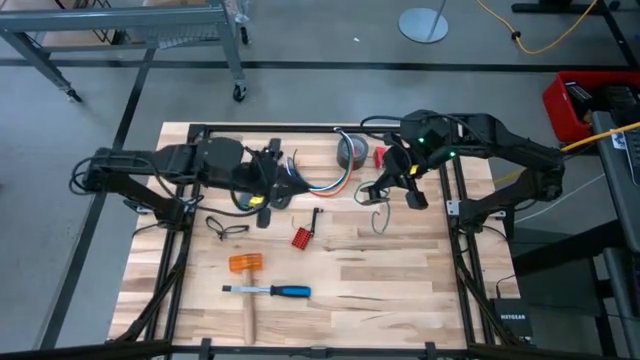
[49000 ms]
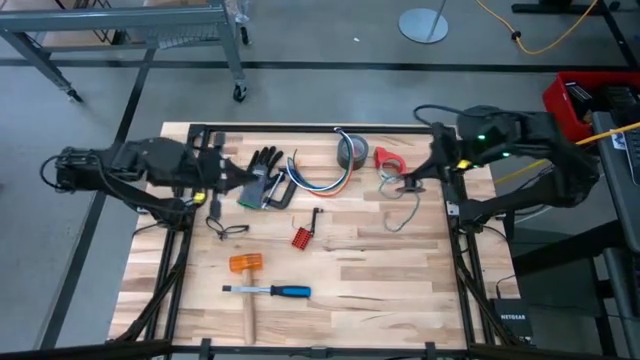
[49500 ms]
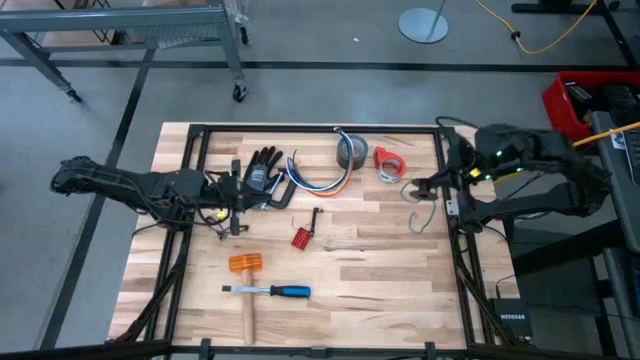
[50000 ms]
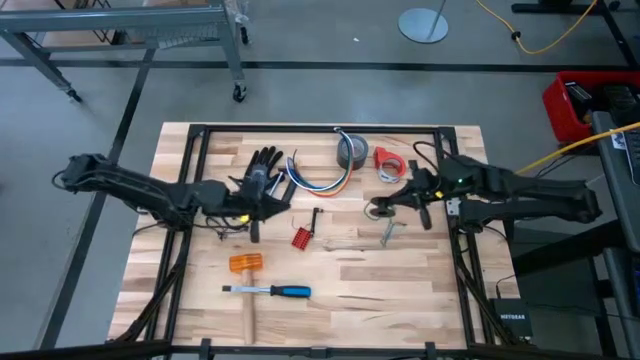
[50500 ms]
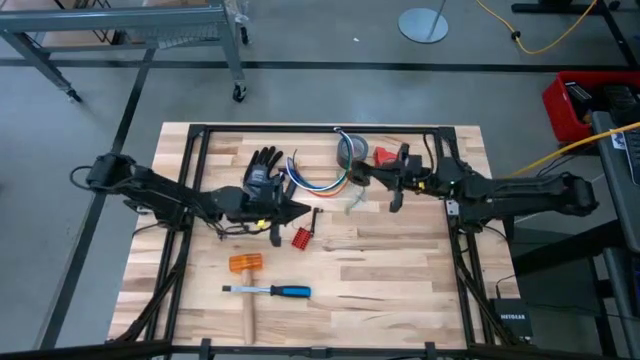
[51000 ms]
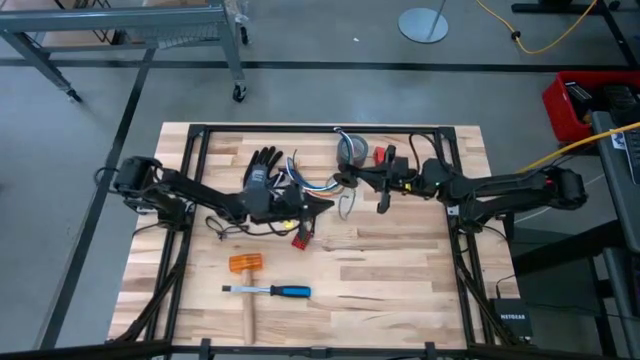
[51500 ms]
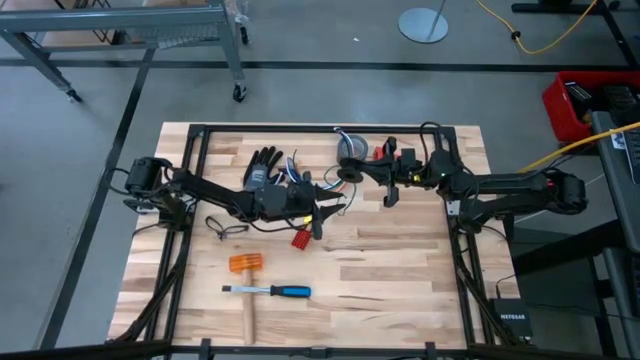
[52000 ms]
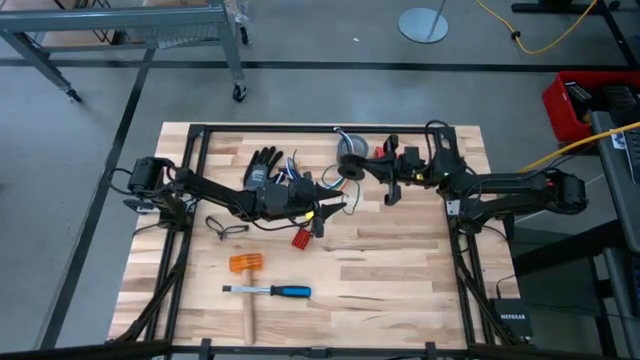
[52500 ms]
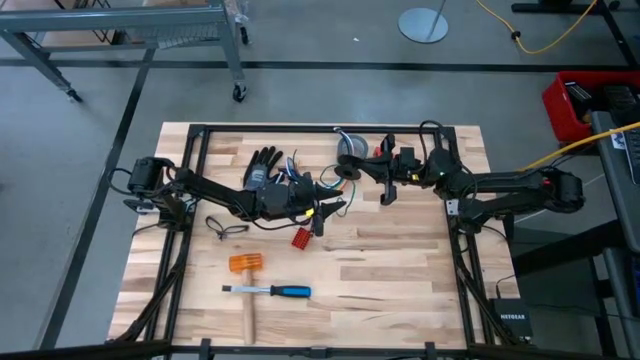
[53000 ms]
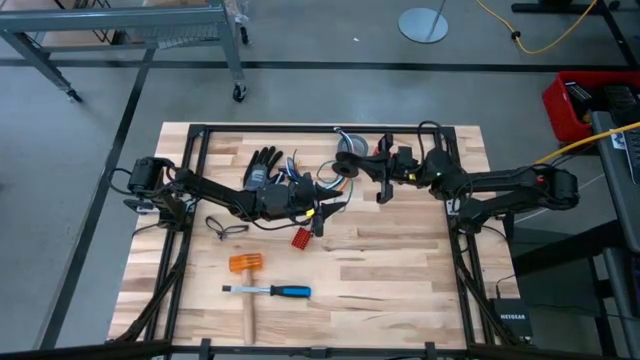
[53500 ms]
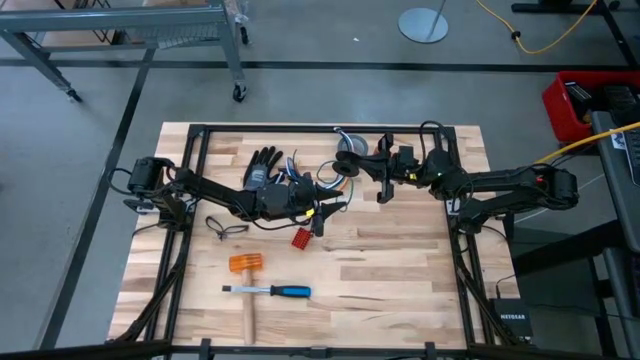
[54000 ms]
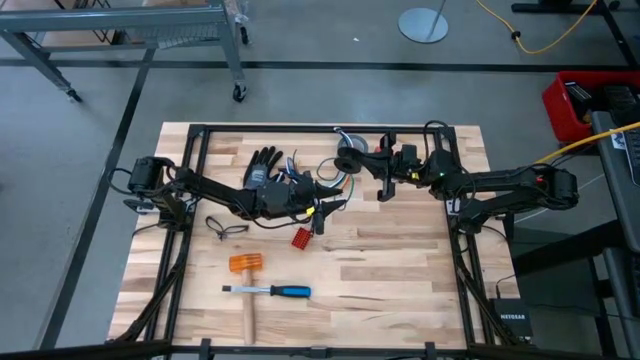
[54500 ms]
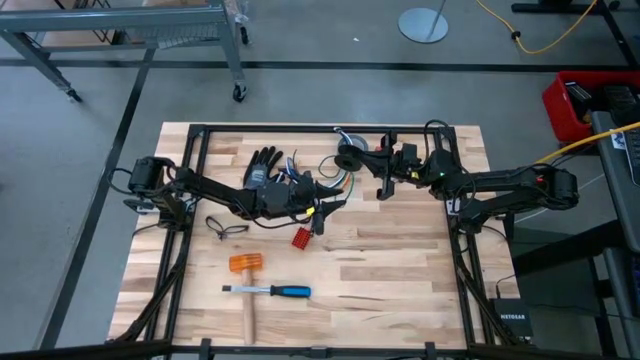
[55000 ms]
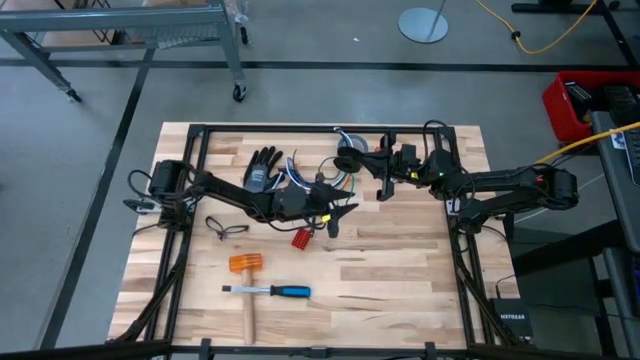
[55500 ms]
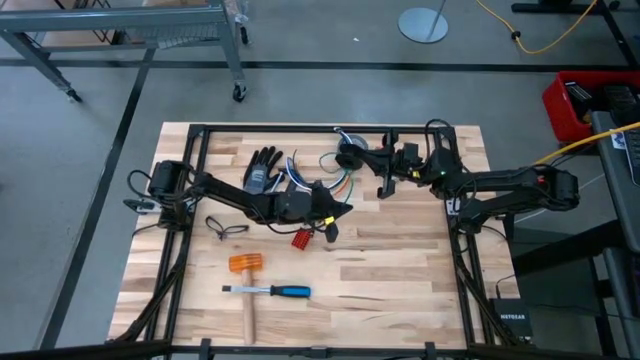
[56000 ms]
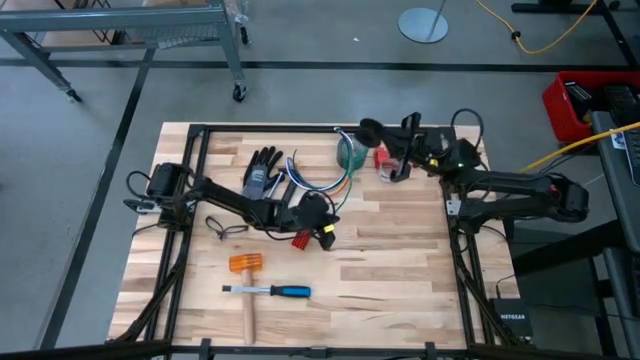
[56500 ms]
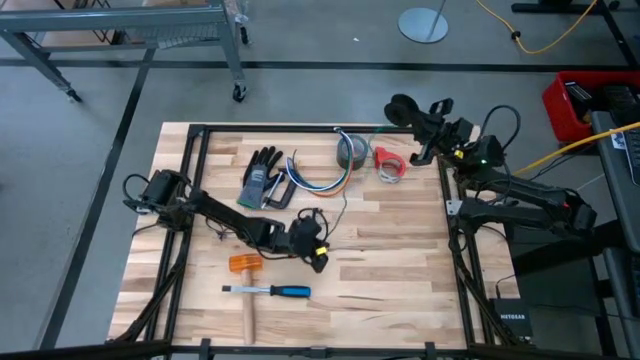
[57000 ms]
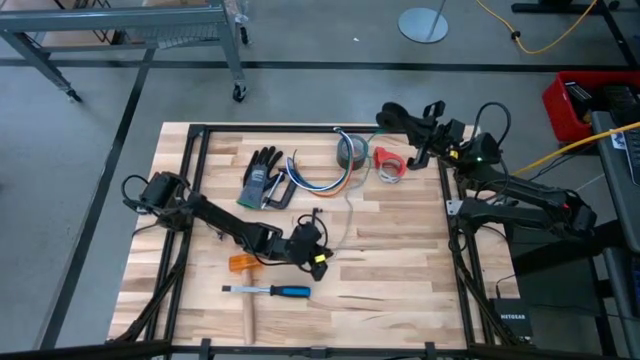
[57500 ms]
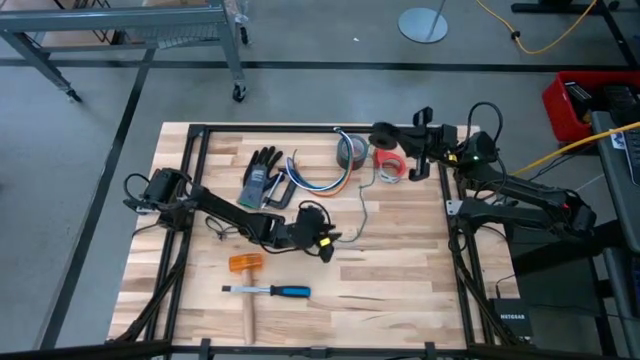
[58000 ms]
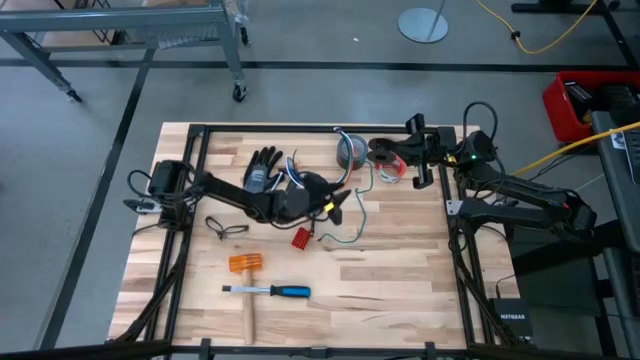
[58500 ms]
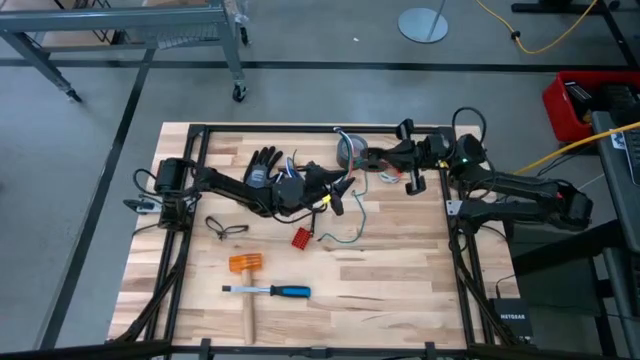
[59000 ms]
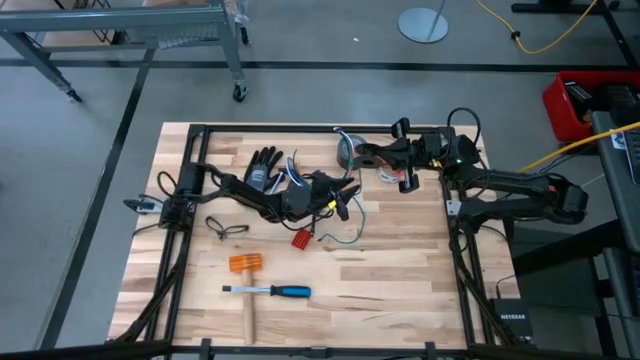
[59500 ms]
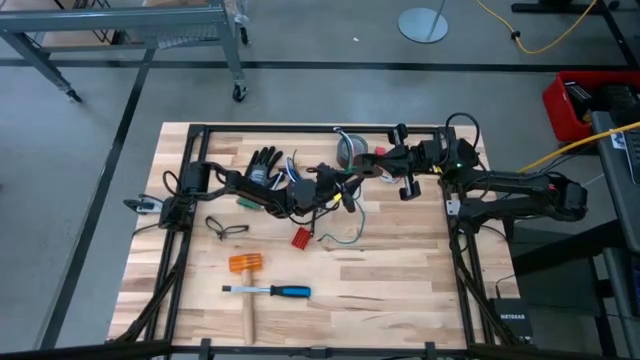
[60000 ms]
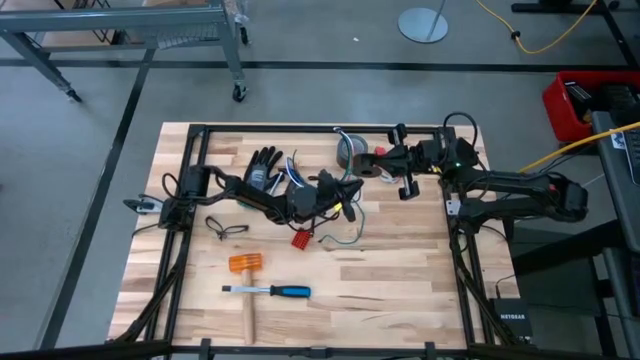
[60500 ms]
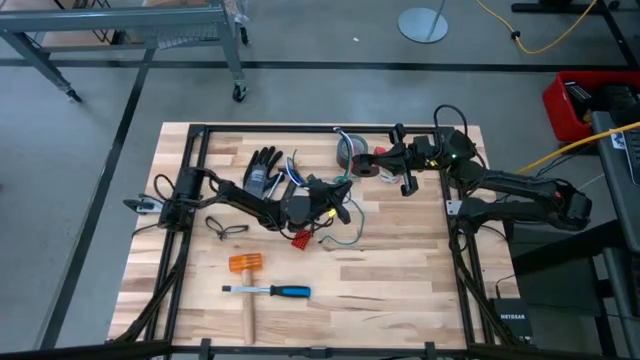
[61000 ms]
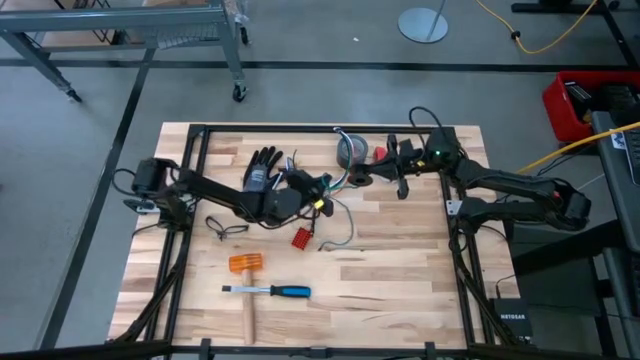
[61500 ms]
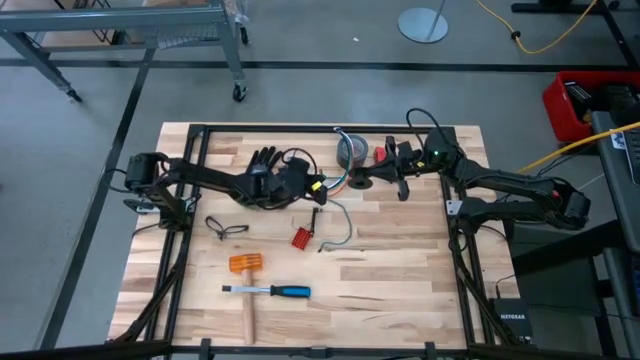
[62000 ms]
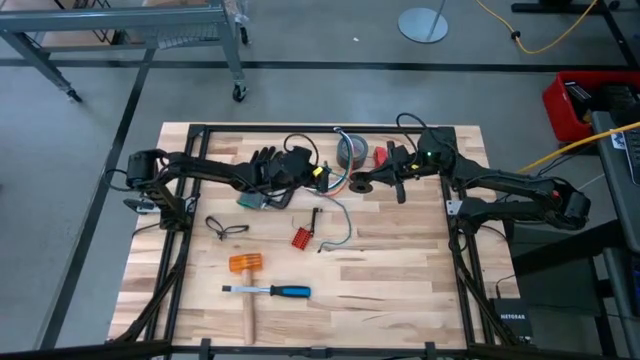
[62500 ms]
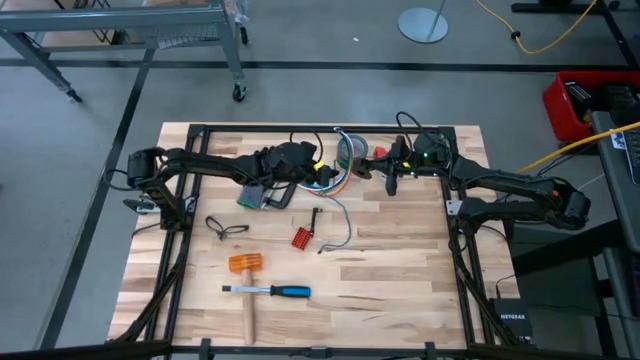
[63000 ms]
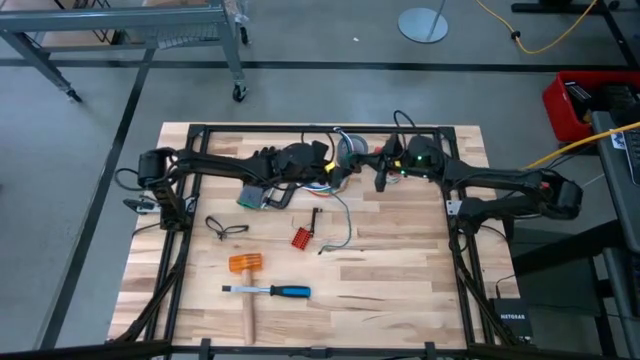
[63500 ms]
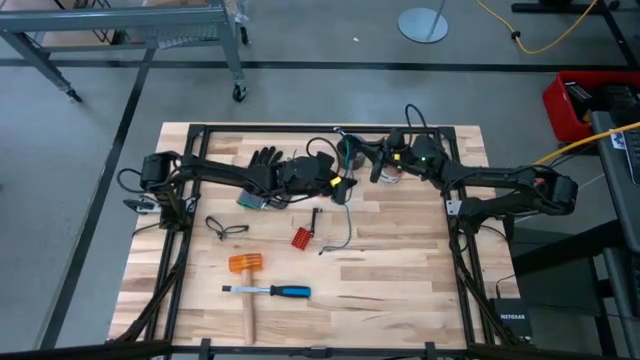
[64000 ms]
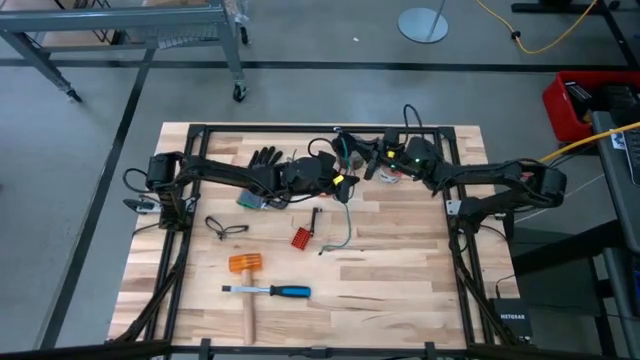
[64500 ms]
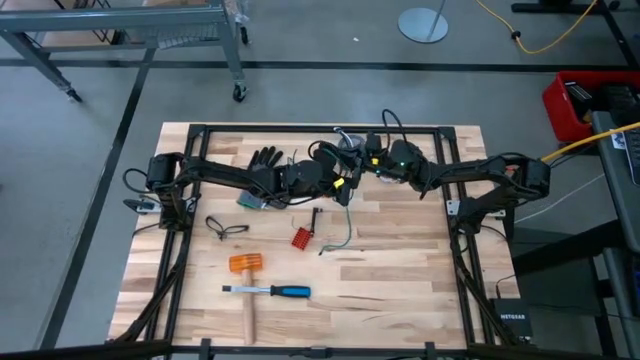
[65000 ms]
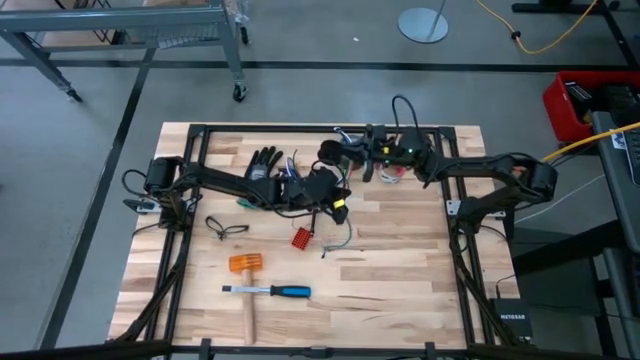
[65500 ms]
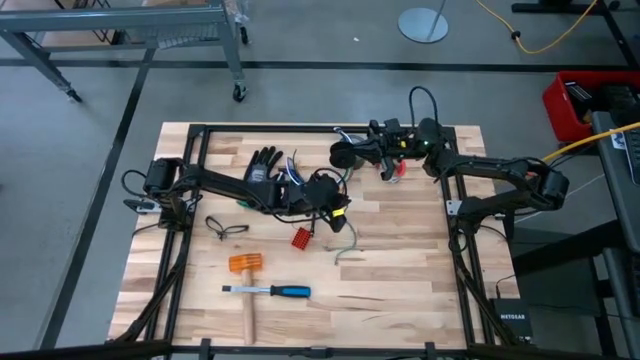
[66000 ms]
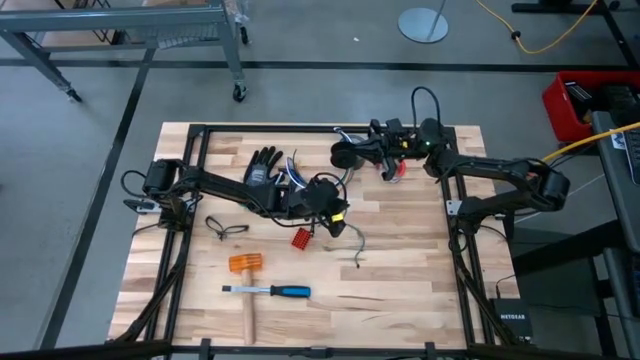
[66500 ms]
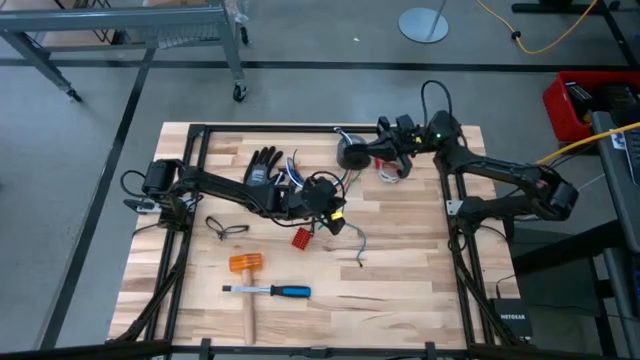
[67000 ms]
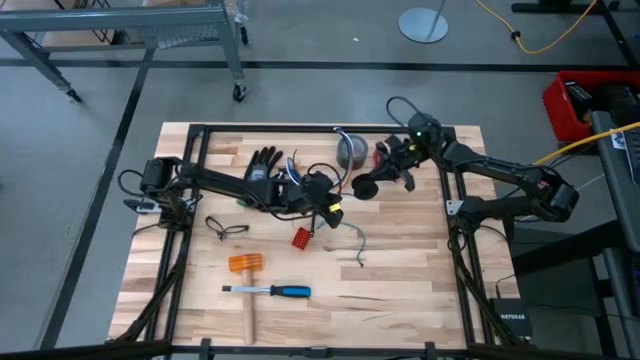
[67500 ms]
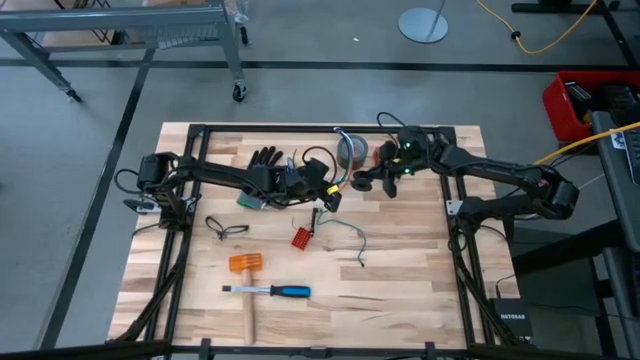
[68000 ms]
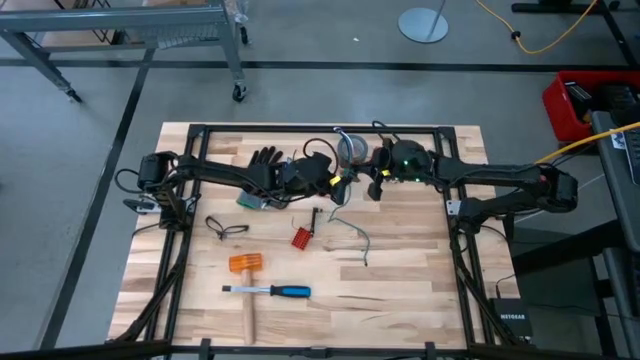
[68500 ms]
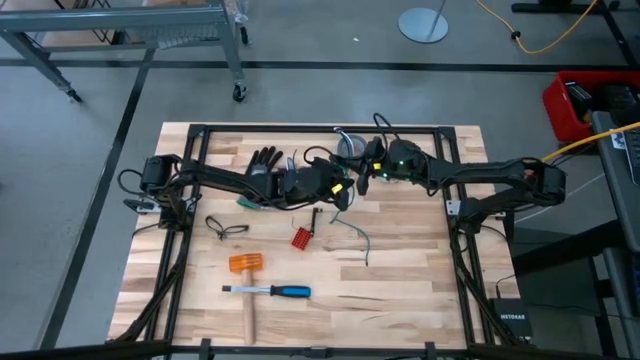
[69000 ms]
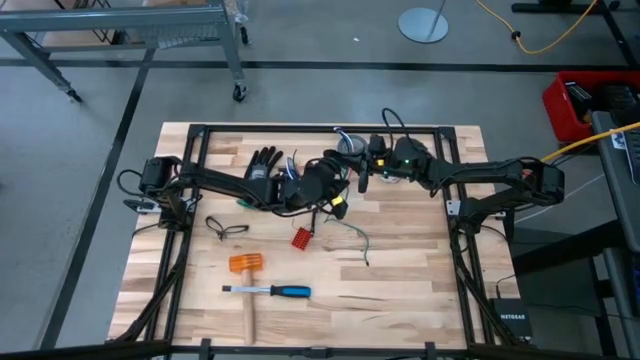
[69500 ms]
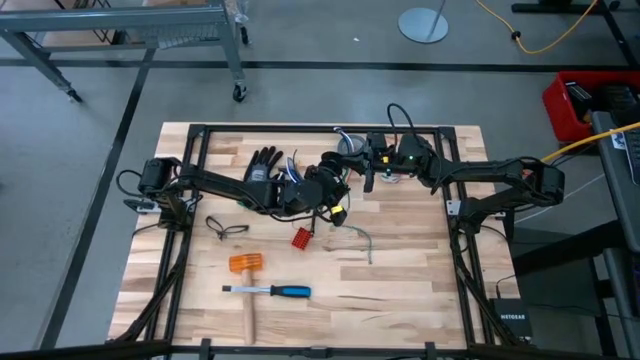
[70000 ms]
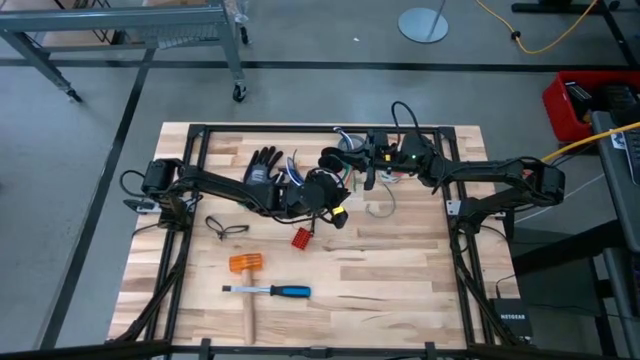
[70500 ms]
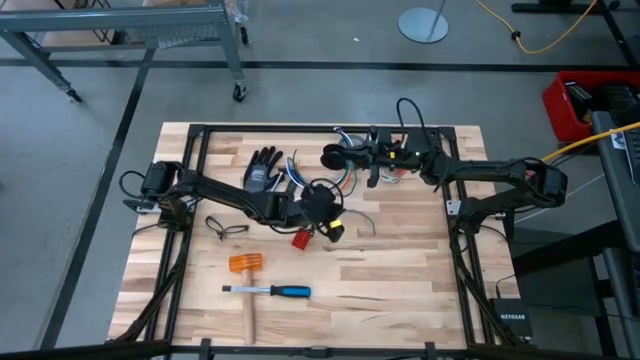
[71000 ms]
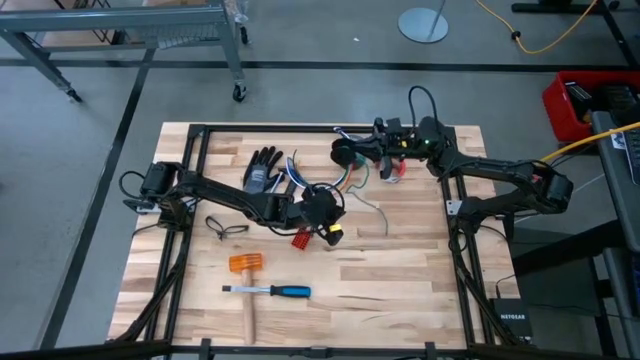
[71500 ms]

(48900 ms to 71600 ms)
Task: Coil cords
Coil the green wire into the black spool
